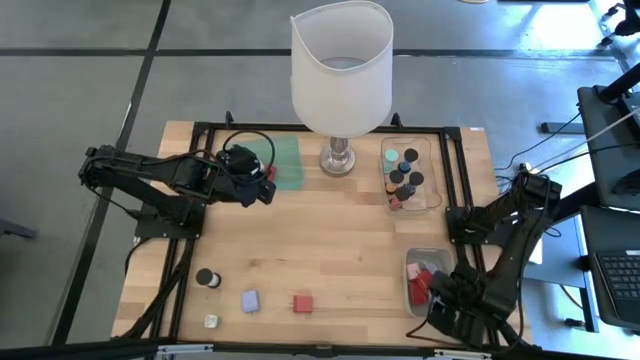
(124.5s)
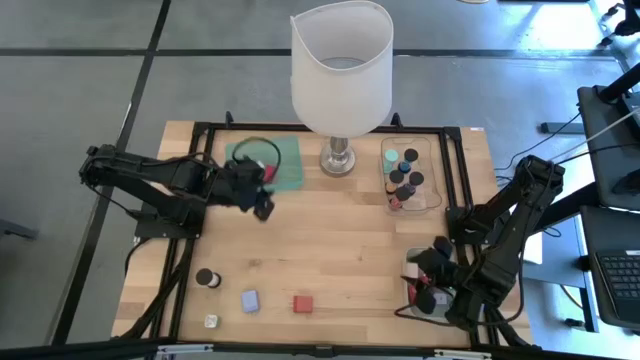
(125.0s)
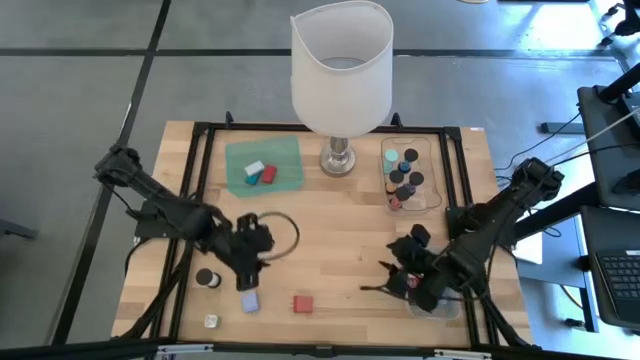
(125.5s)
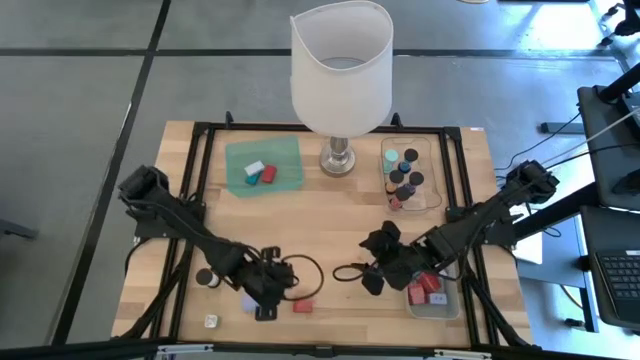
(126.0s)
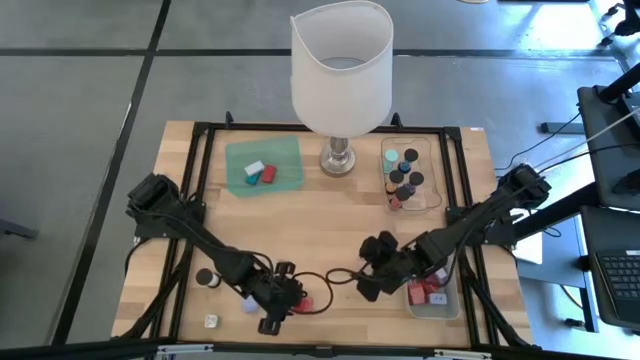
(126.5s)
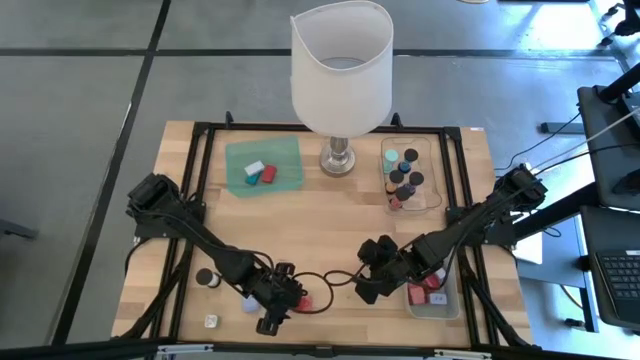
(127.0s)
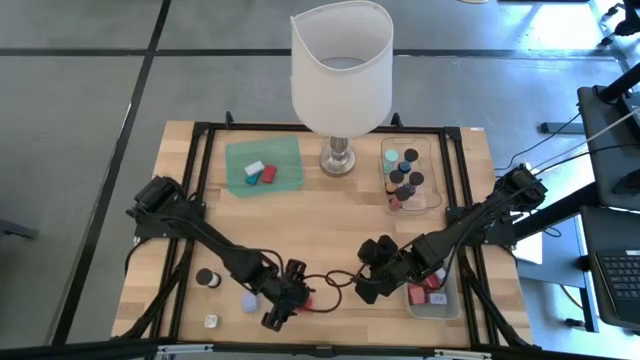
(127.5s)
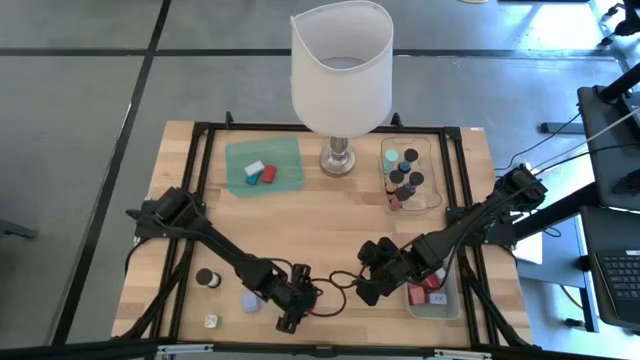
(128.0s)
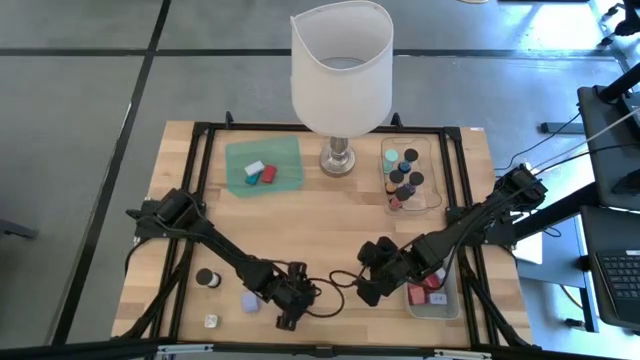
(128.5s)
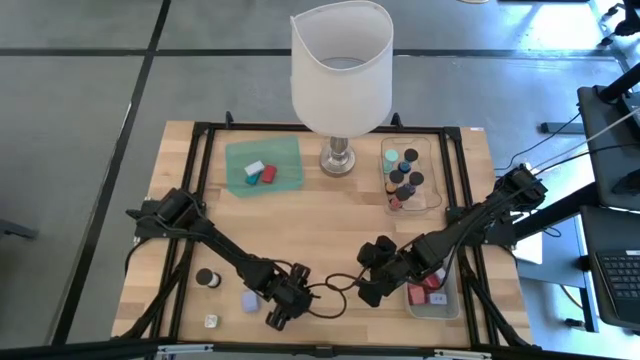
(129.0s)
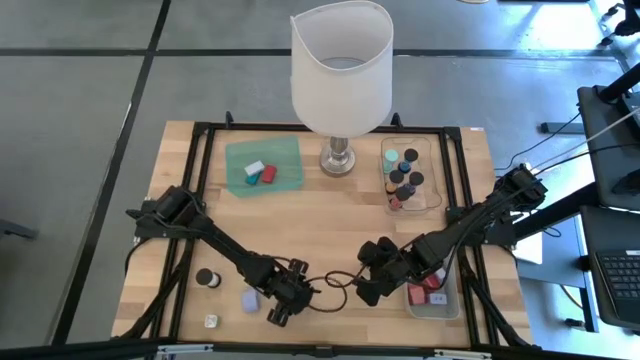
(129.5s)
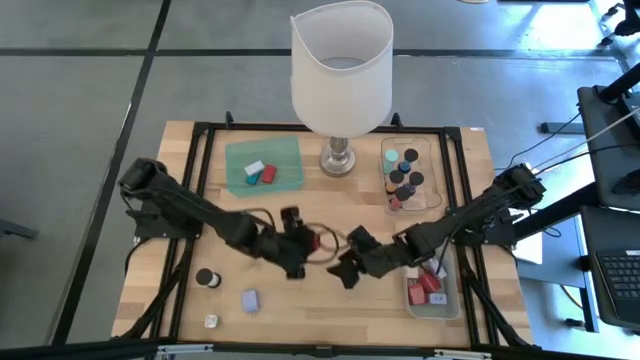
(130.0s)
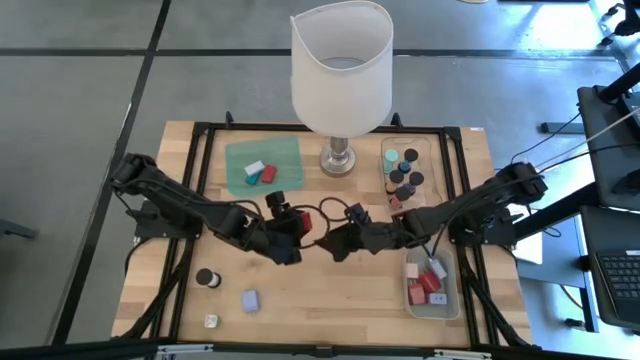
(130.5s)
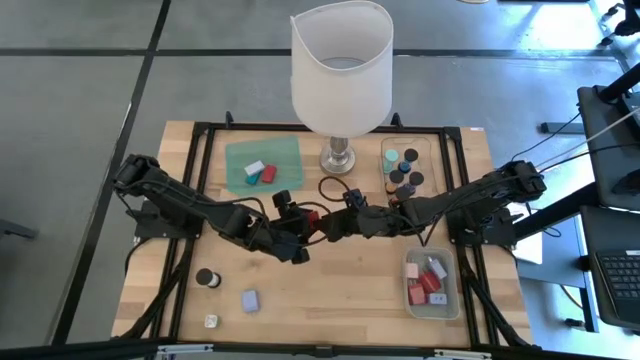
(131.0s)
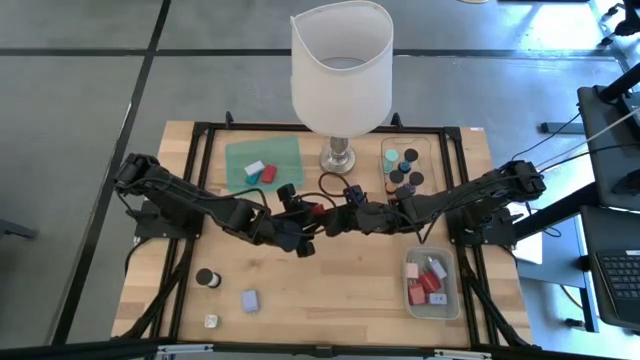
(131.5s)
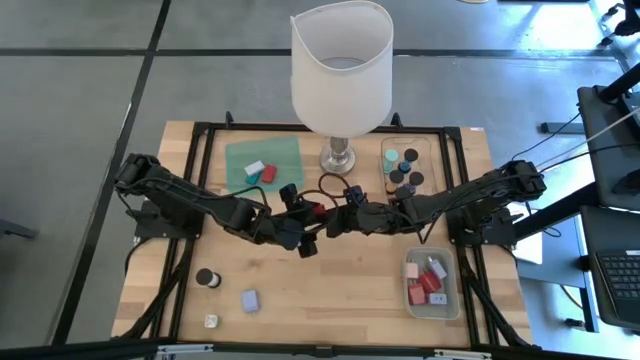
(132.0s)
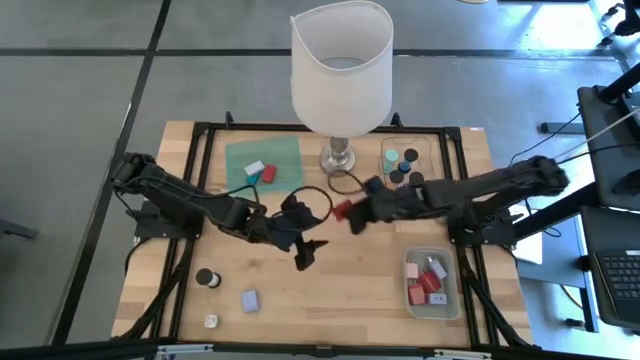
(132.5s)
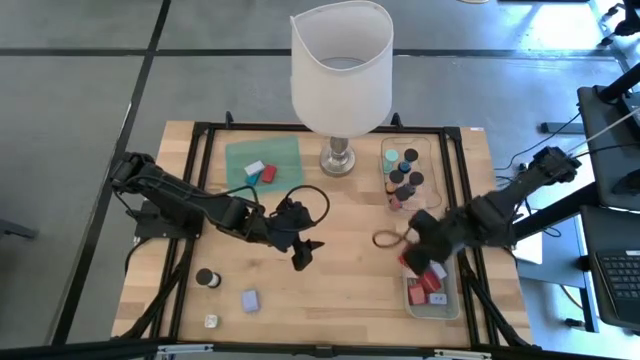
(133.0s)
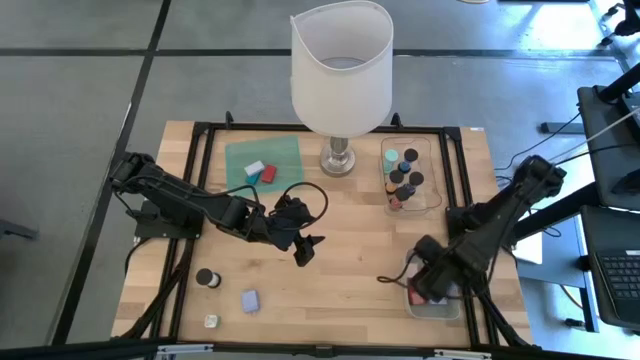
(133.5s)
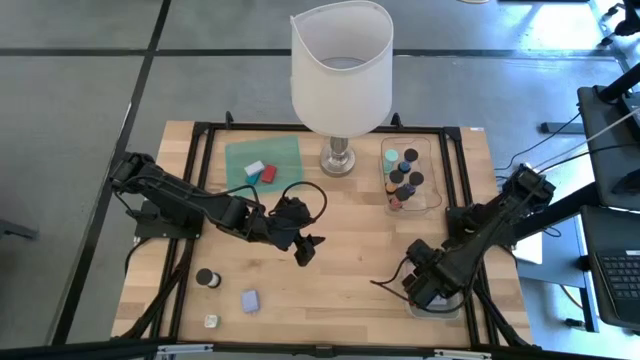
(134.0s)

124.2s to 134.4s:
Task: Pick & Place Office items
Put the red charger adapter into the gray bin

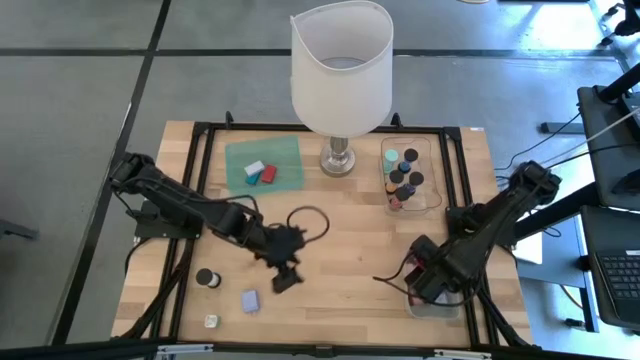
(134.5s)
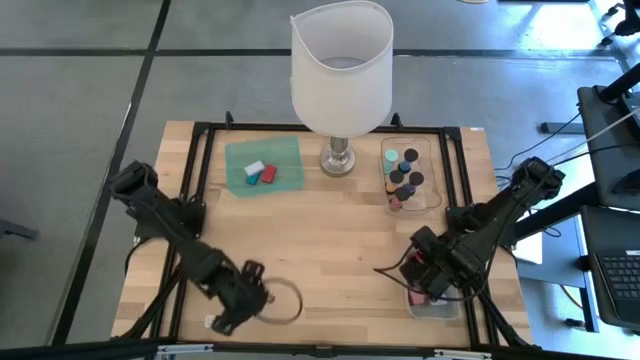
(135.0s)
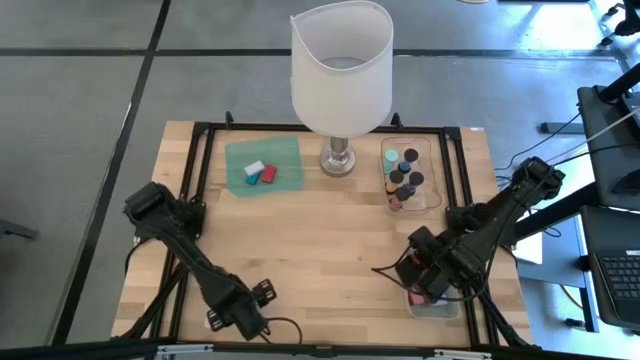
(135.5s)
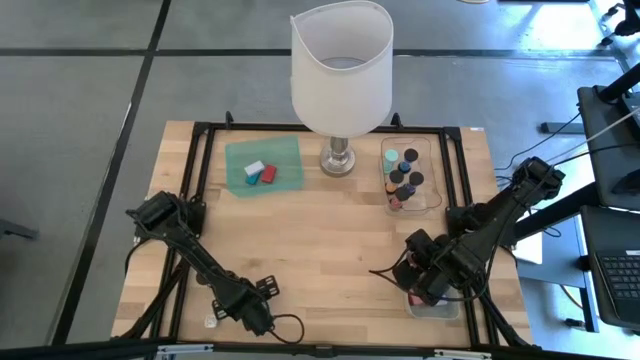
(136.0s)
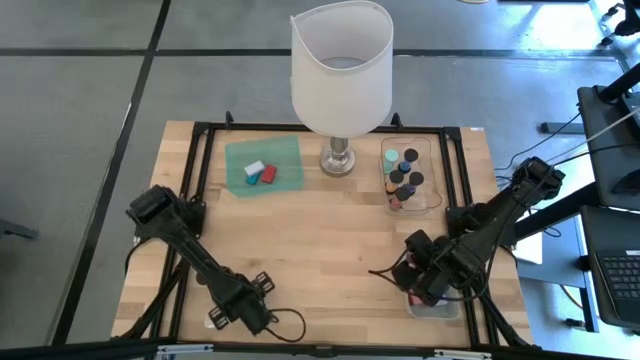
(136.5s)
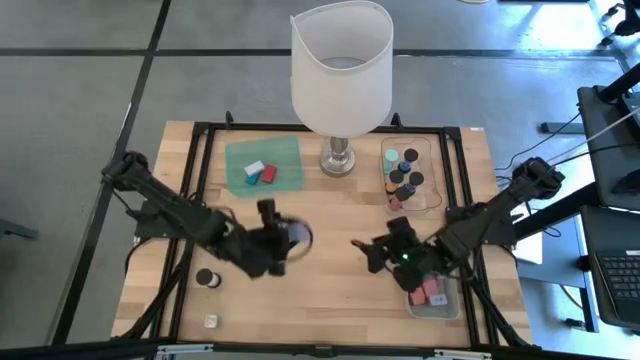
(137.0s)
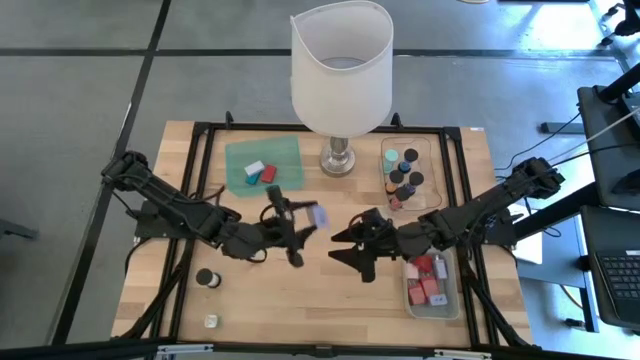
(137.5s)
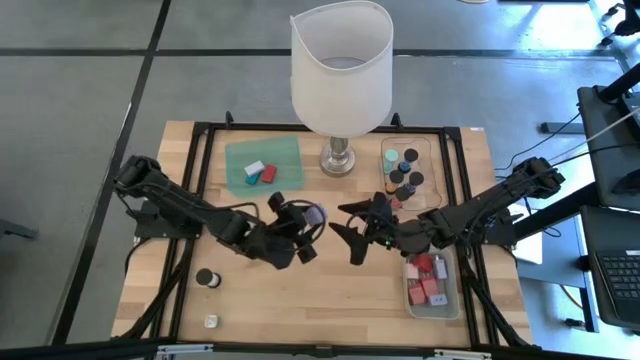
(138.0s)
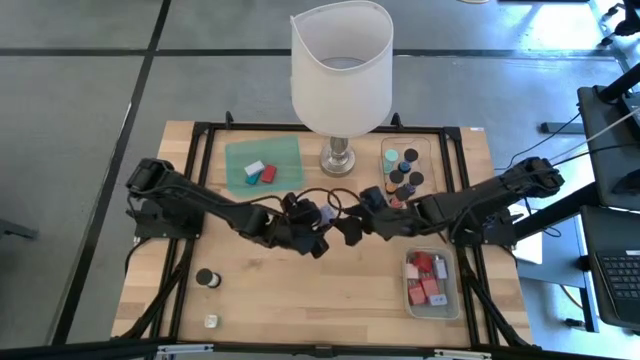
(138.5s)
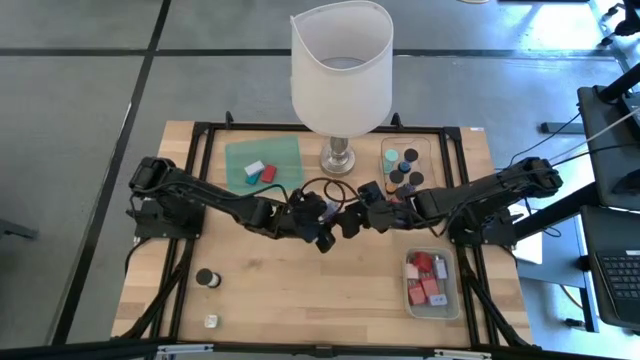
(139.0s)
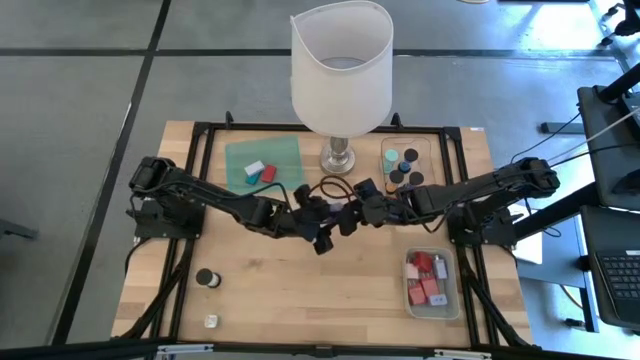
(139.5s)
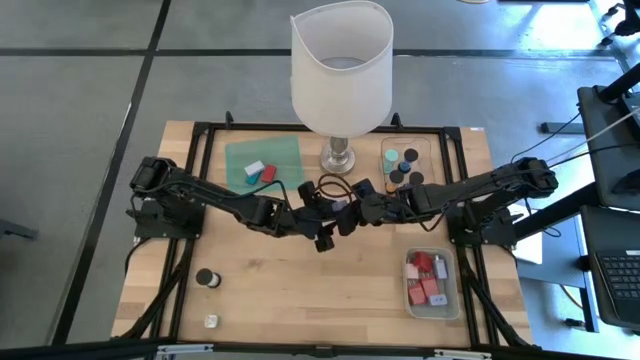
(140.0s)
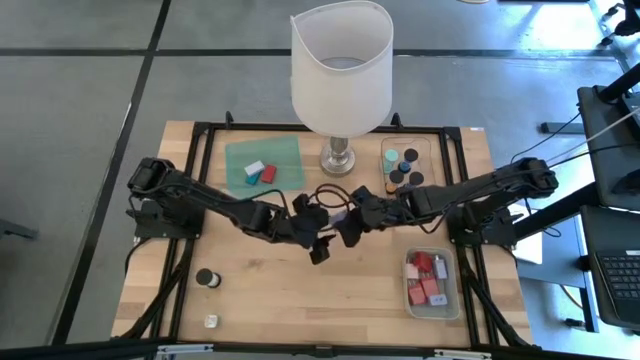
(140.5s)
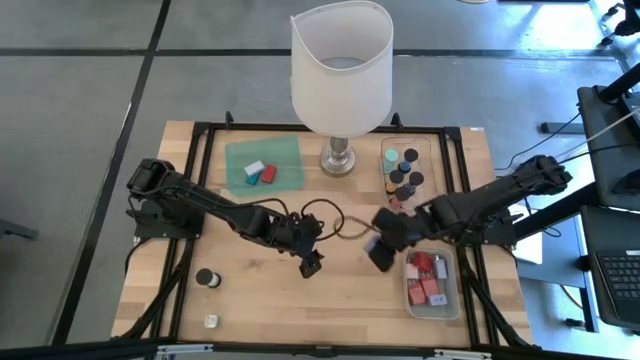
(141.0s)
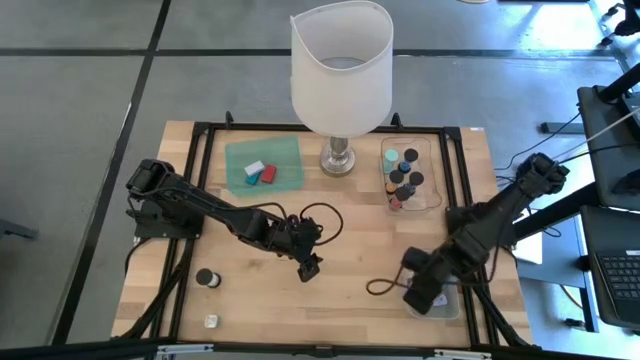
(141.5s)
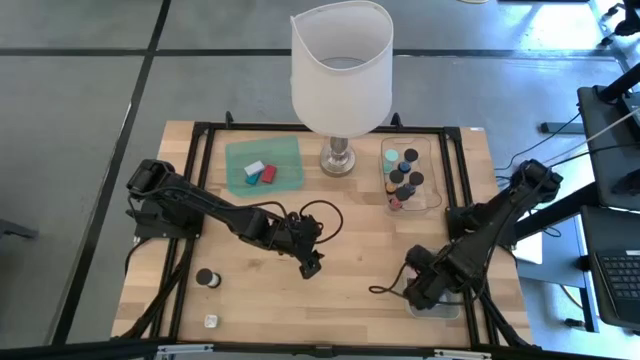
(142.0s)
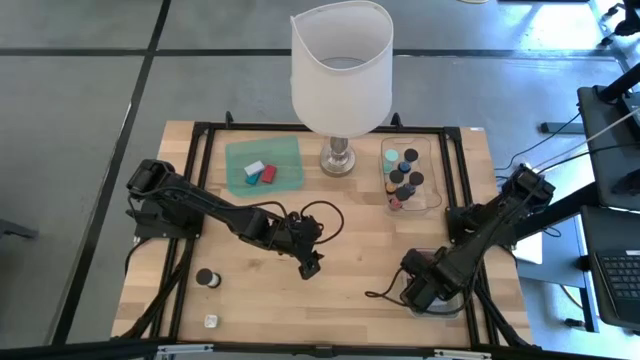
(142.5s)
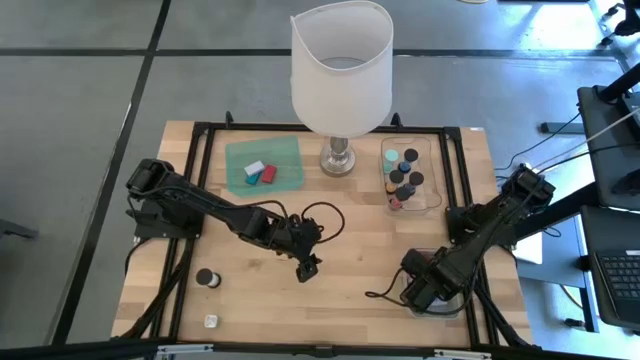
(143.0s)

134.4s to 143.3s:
Put the violet charger adapter into the gray bin

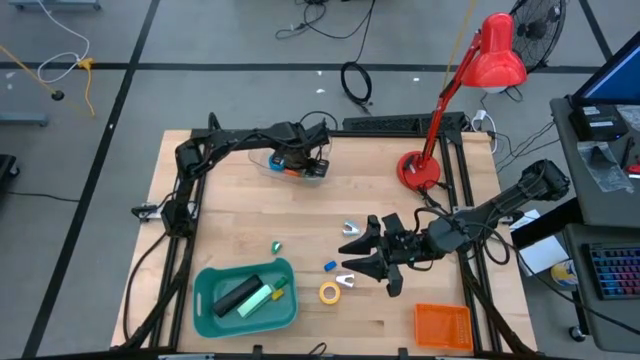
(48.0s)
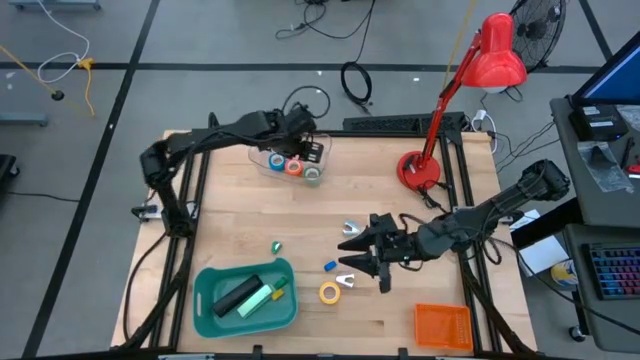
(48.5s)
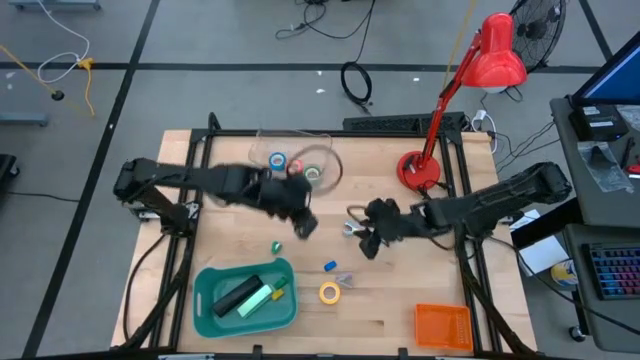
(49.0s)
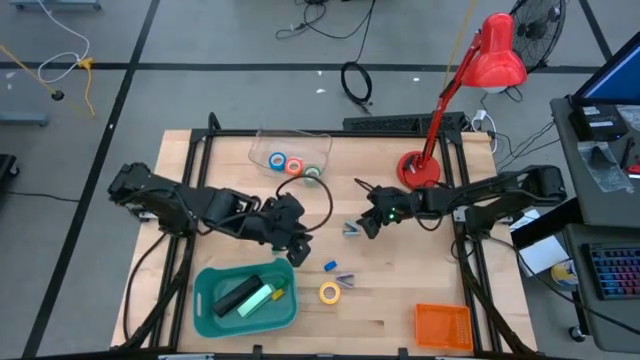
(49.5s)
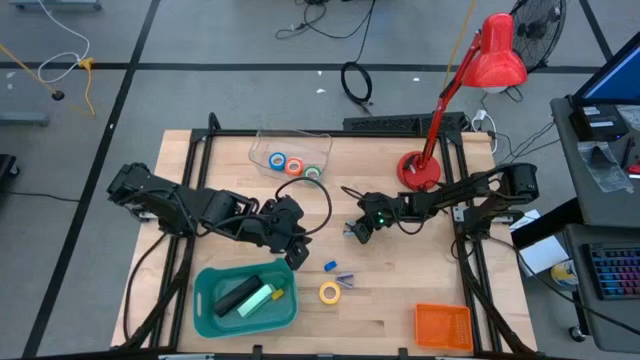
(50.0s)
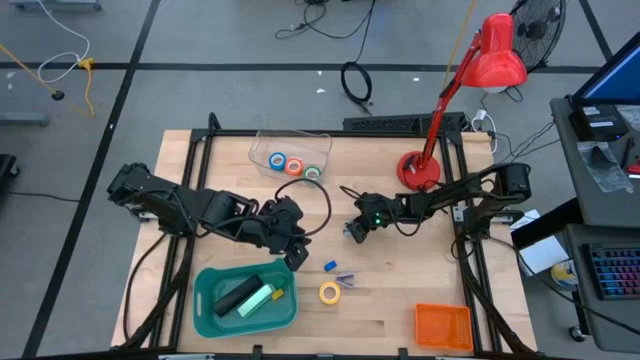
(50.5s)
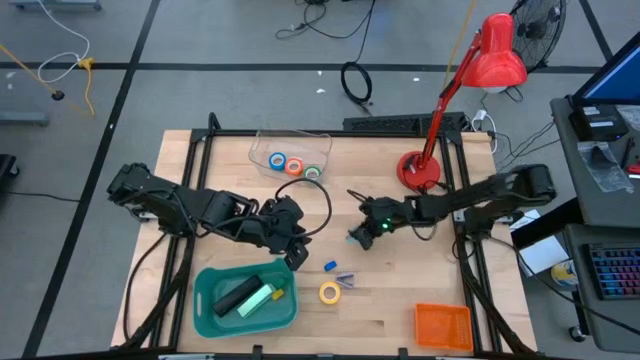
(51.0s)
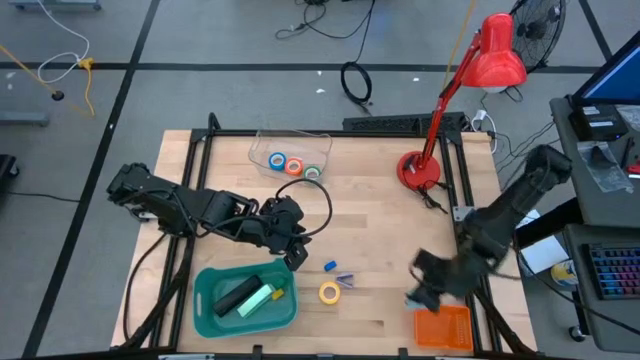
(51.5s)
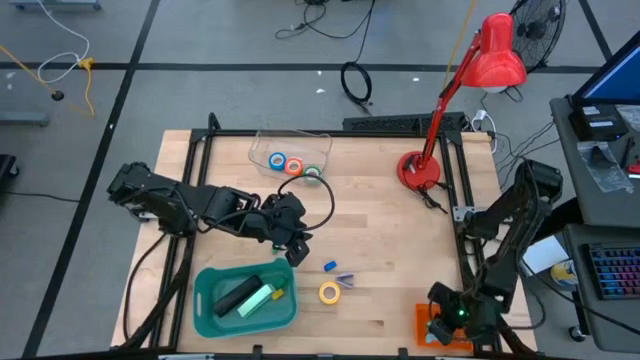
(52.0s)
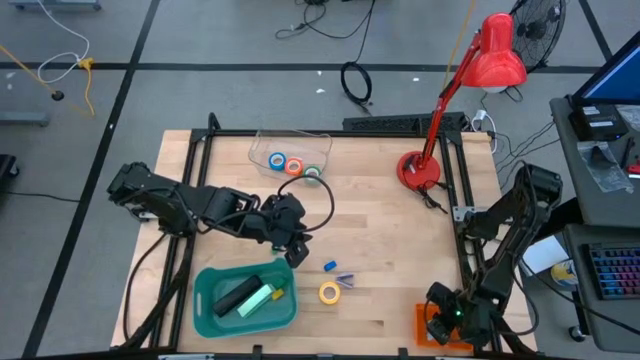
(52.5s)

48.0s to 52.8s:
Task: Pick and place Stapler, Stapler remover, tape
Put the light blue staple remover into the orange bin
